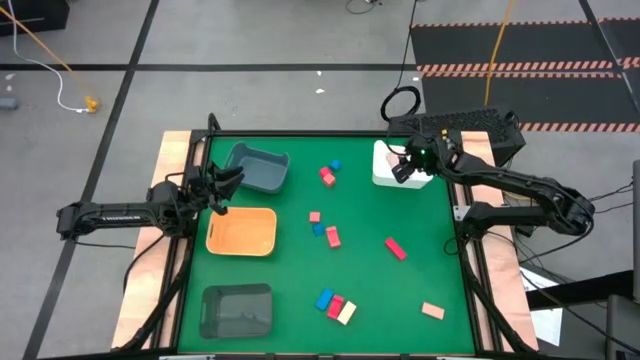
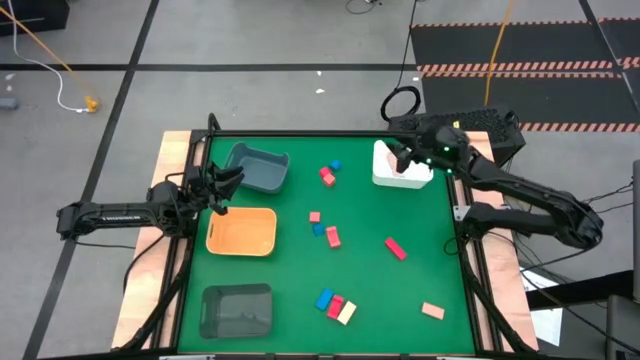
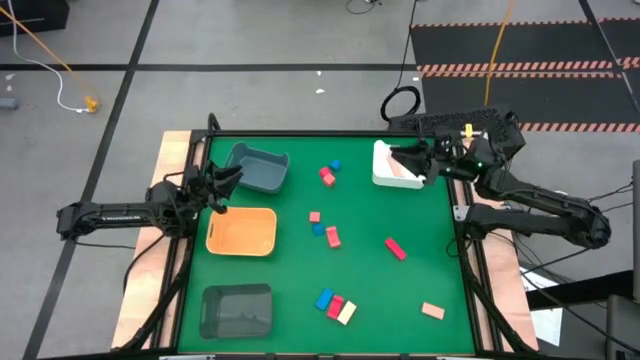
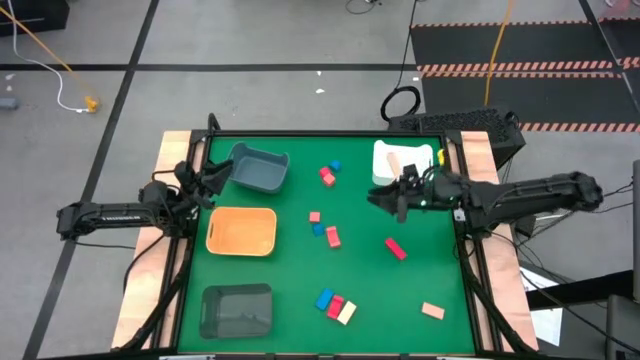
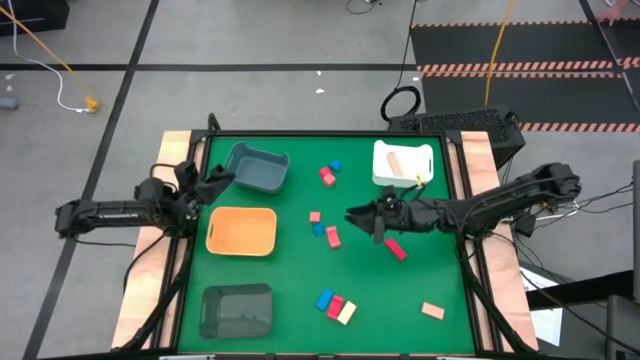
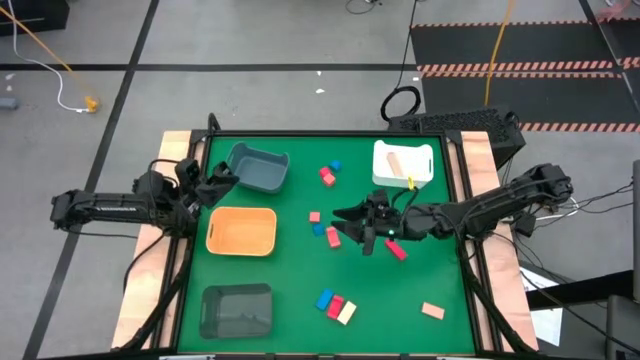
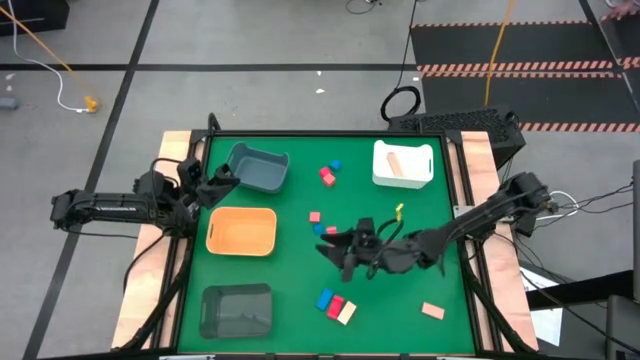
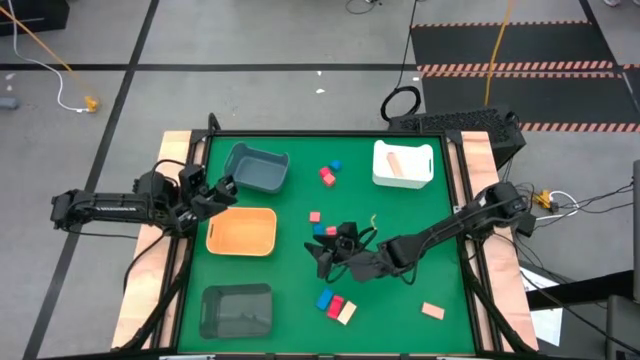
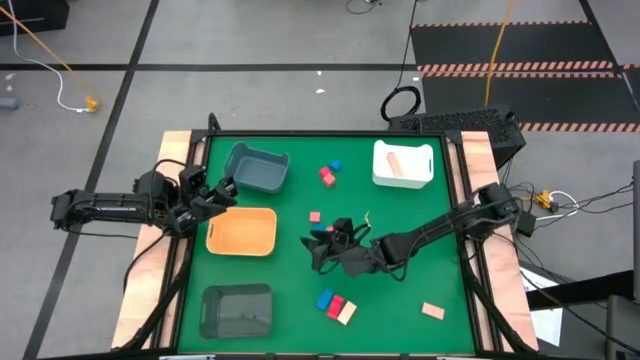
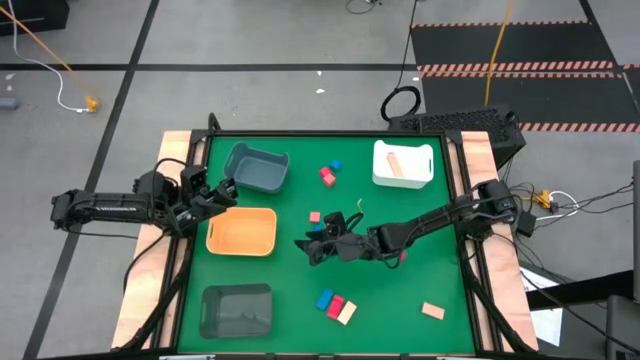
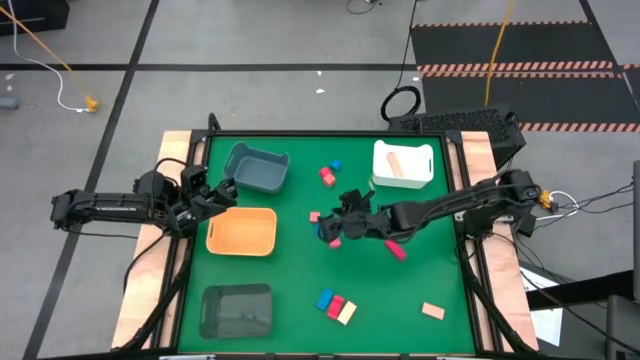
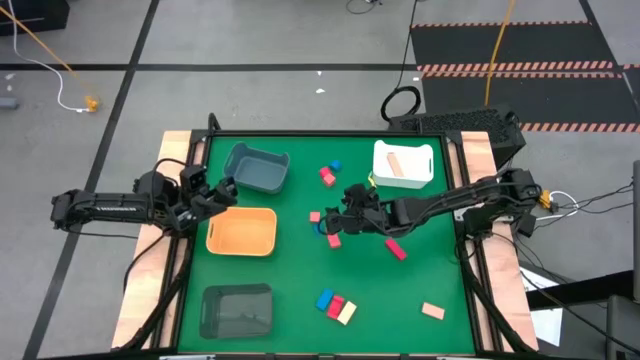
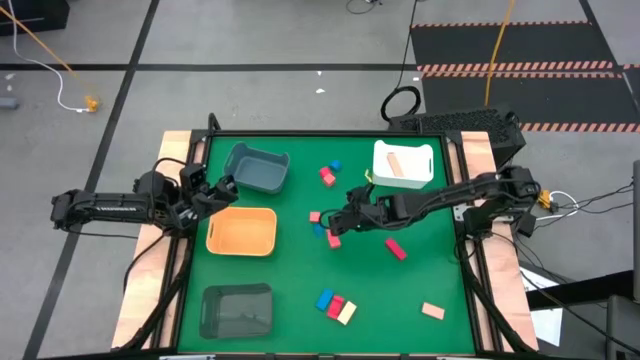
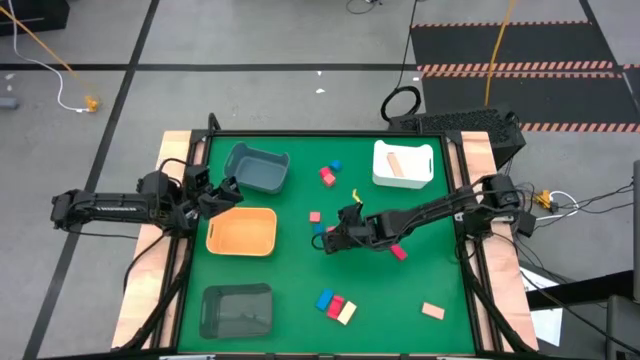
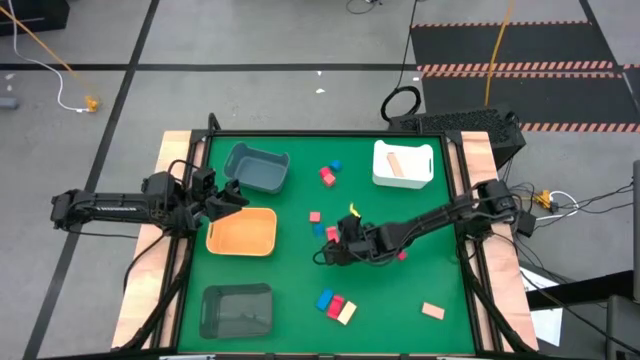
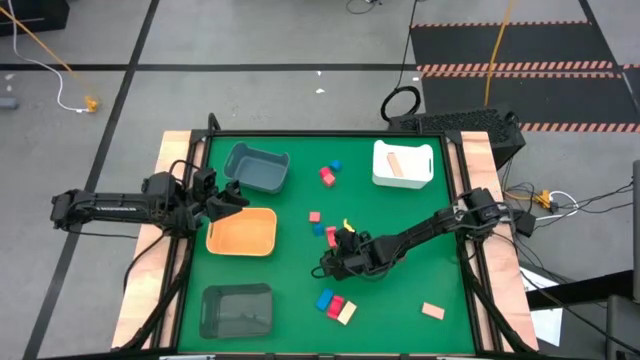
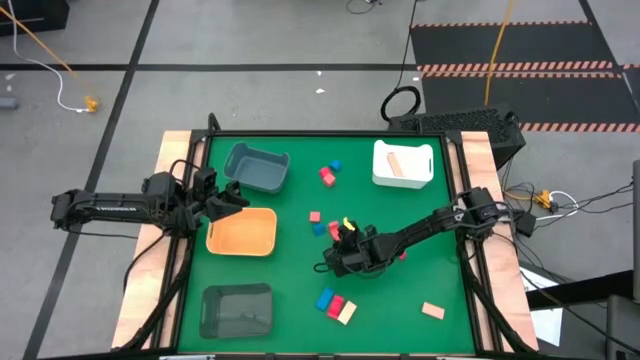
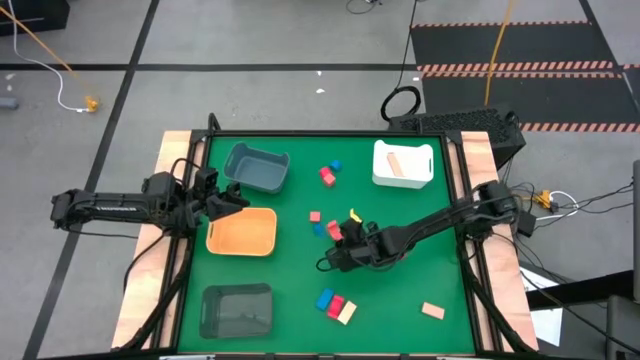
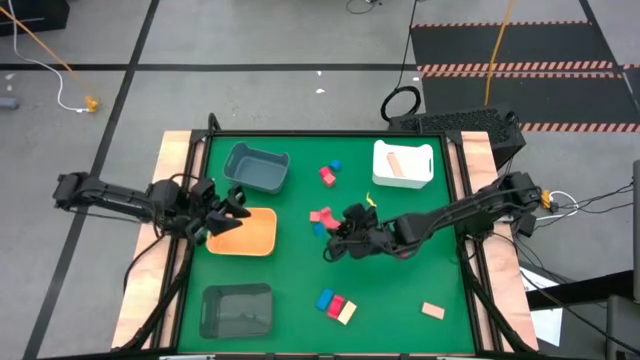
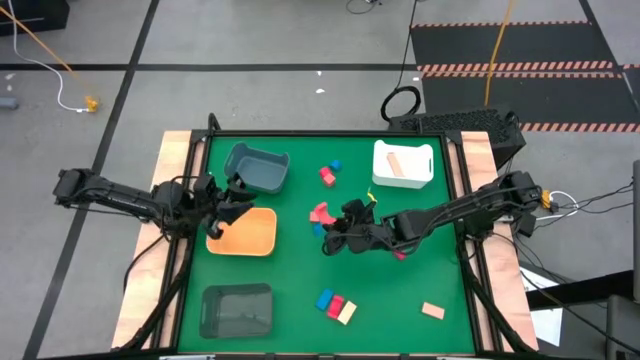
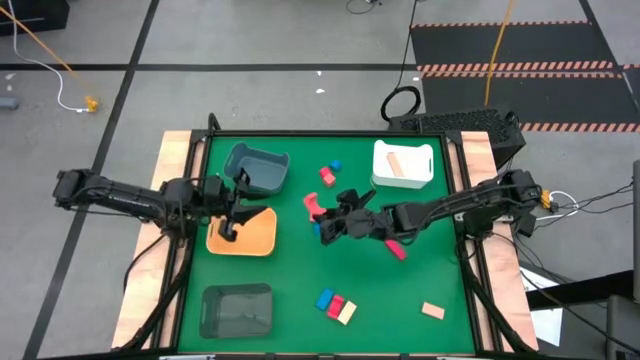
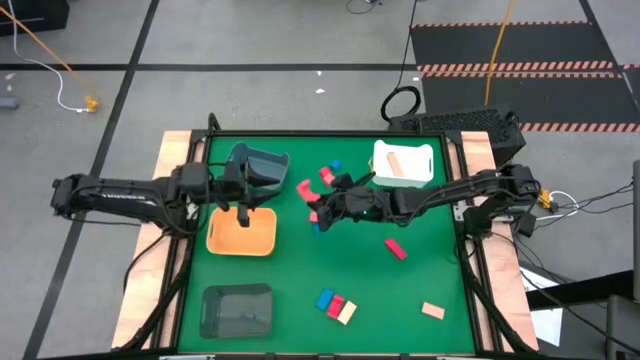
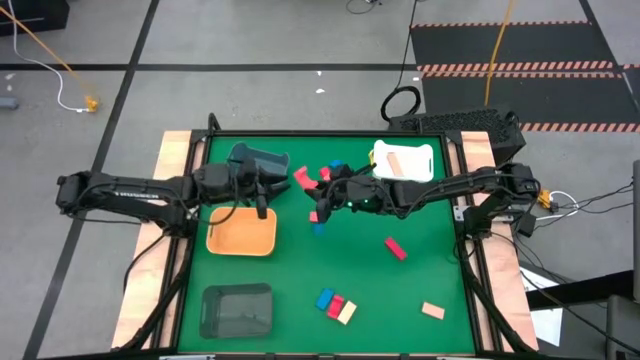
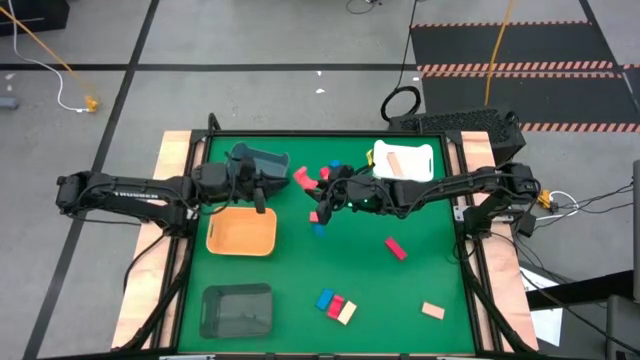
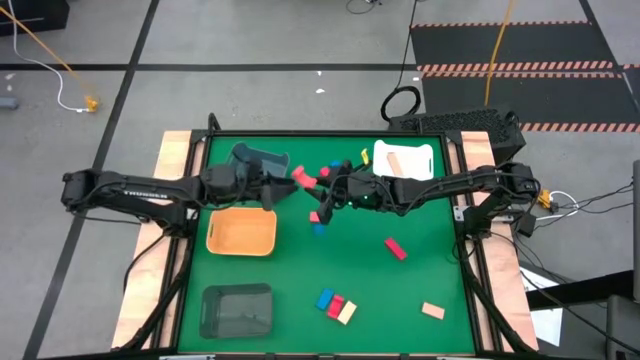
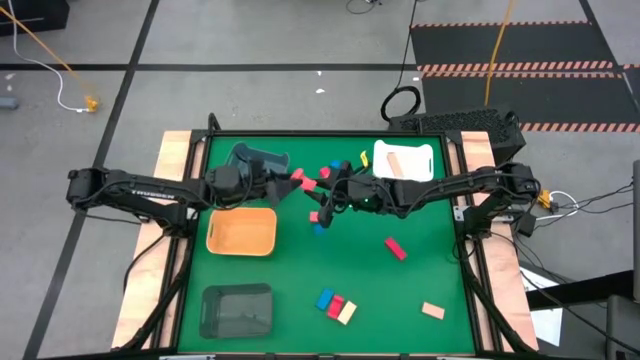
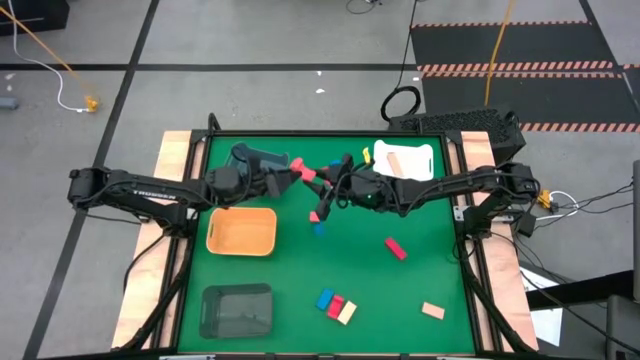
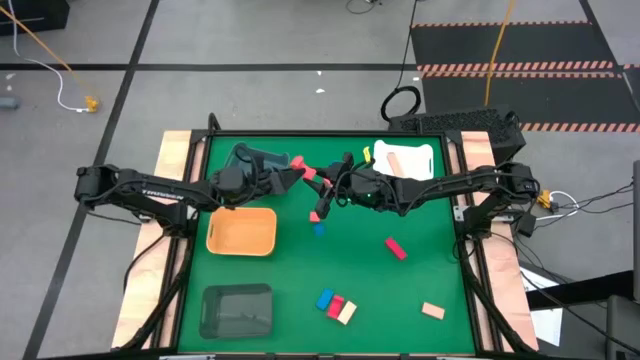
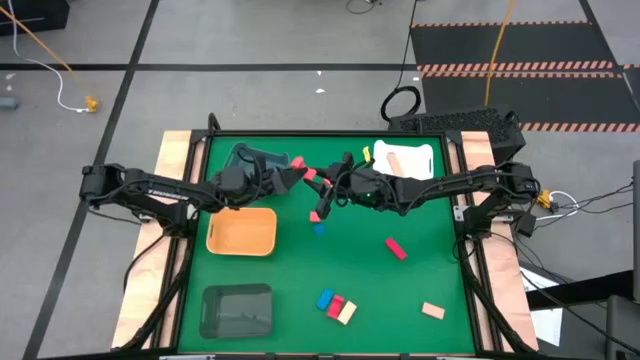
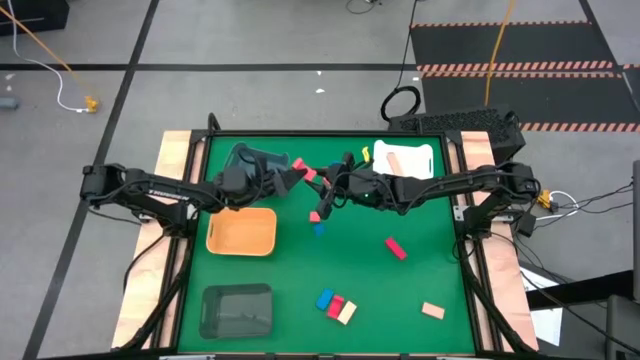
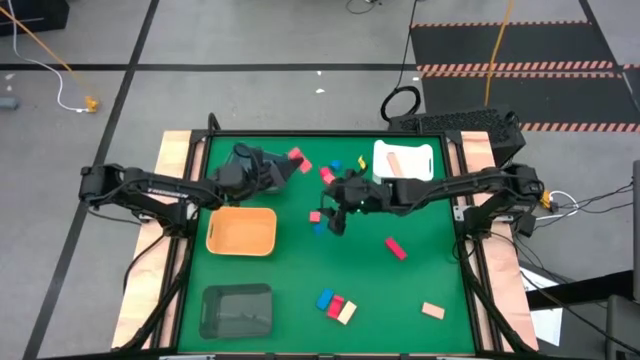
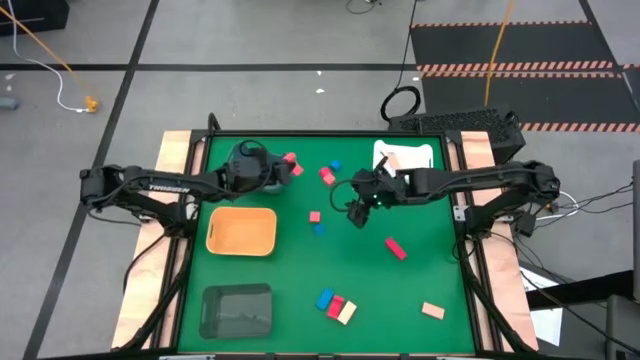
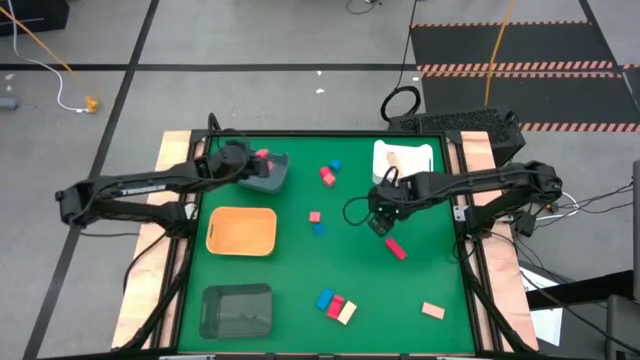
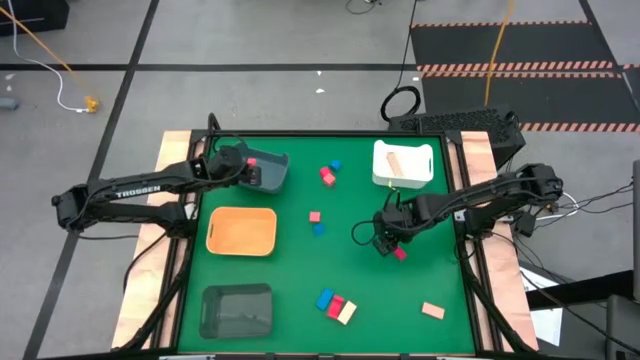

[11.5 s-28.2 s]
Task: Sort & place blocks by color
Put the bottom orange block into the blue bin

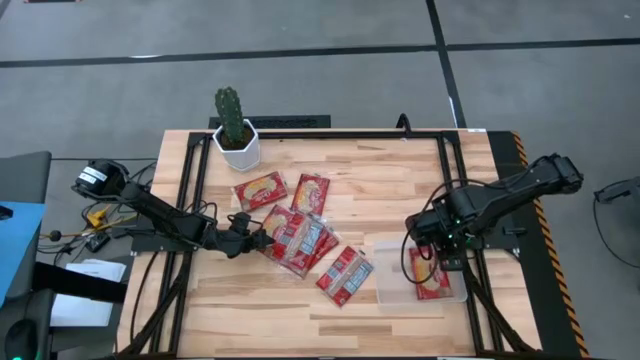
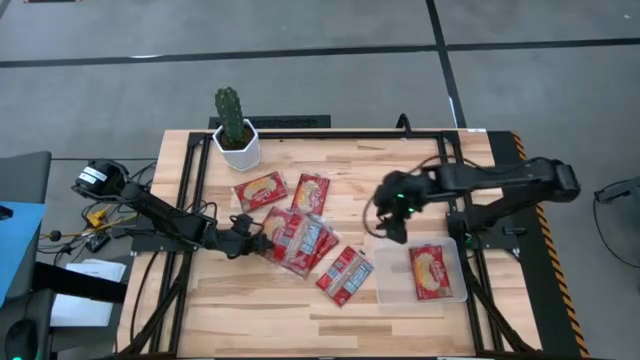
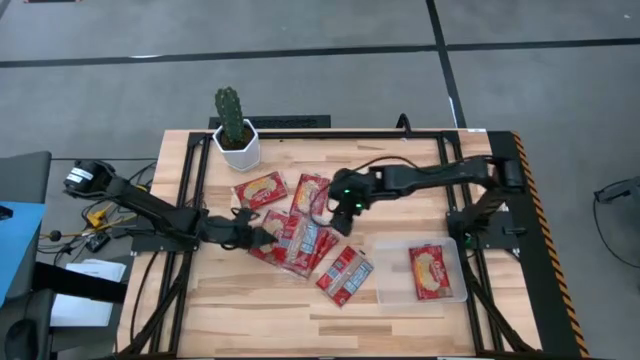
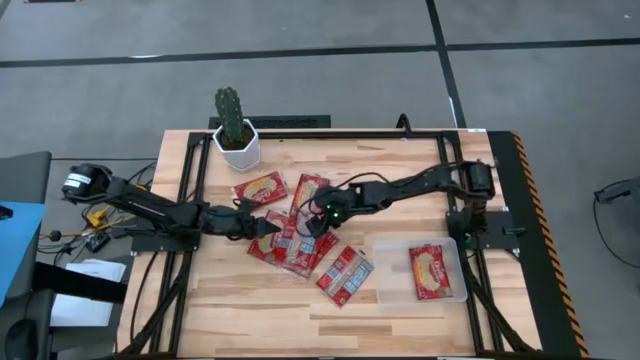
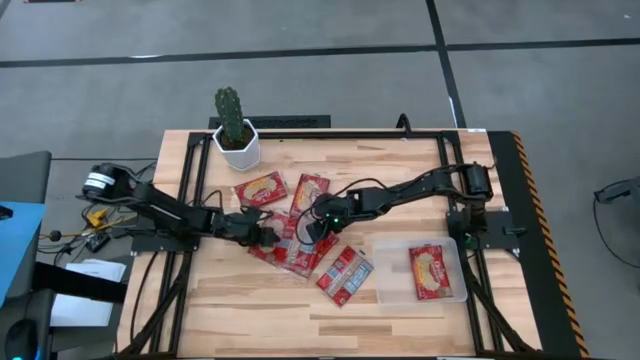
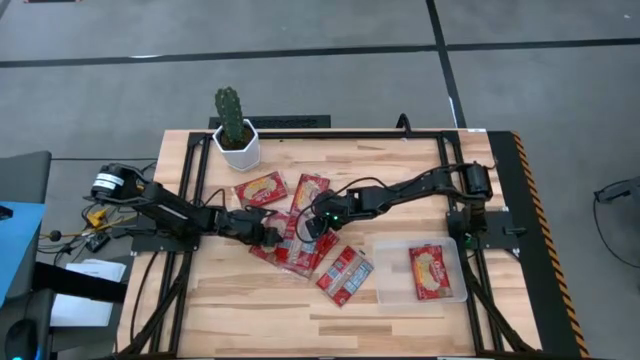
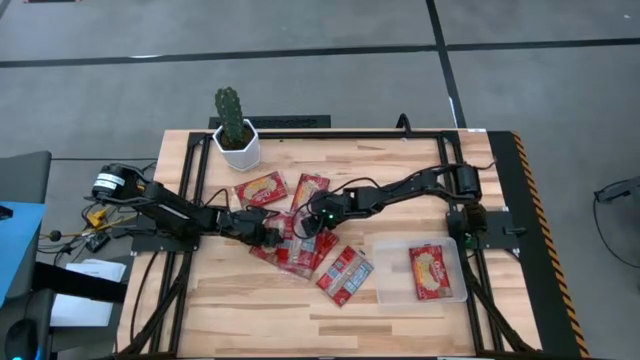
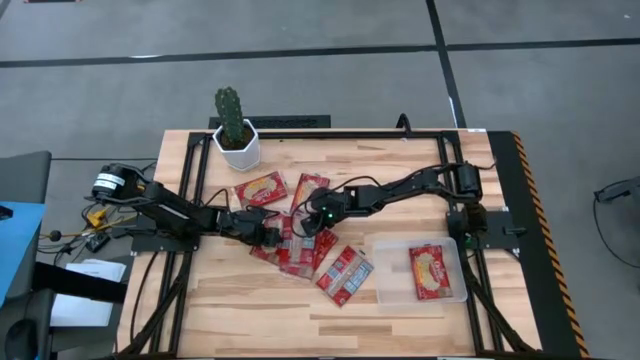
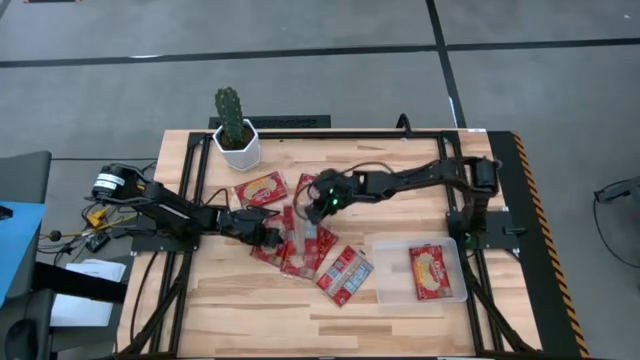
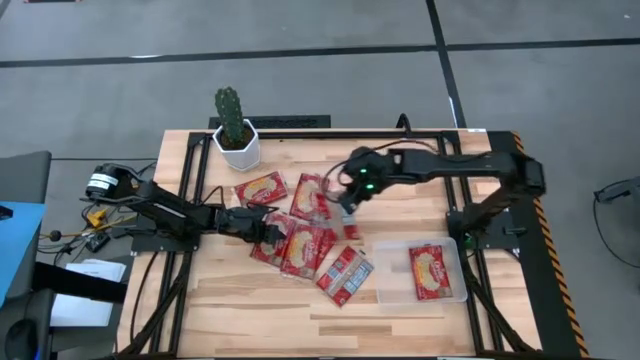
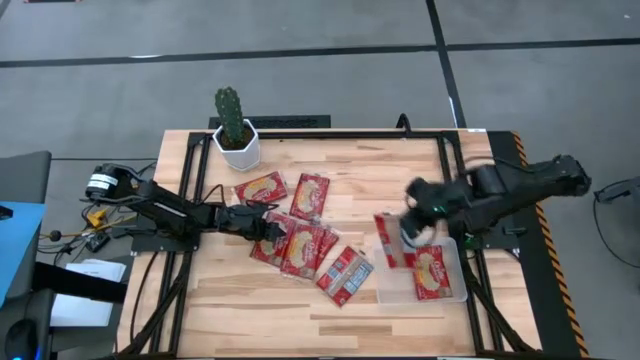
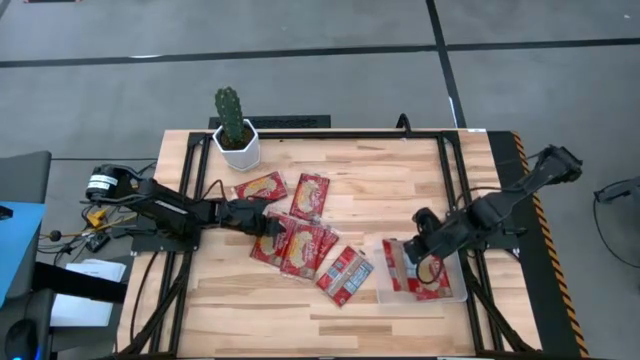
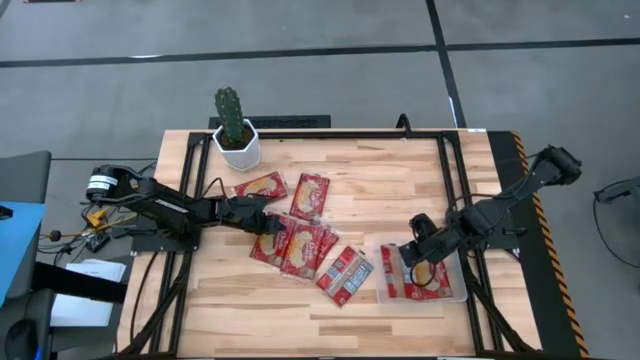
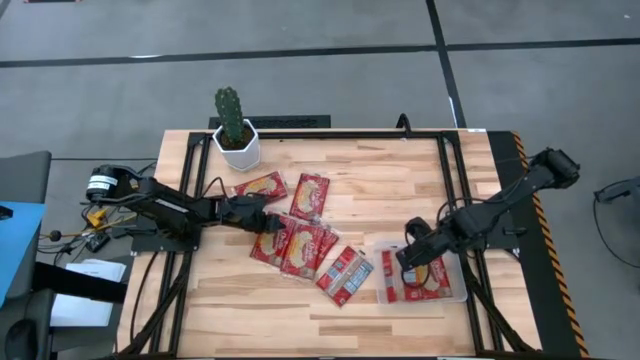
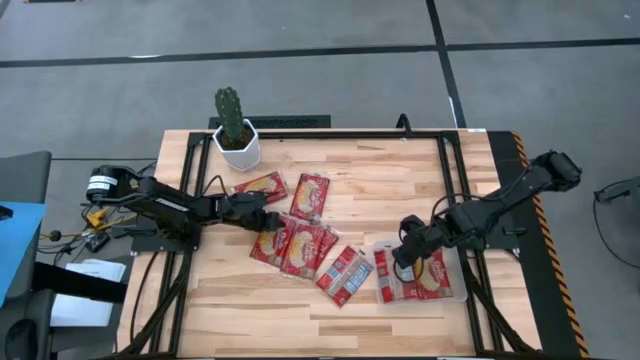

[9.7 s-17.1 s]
Task: Sort popcorn bags into baskets
Put the popcorn bag into the transparent bin
